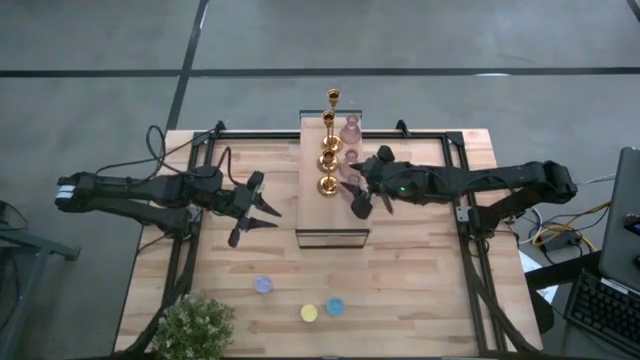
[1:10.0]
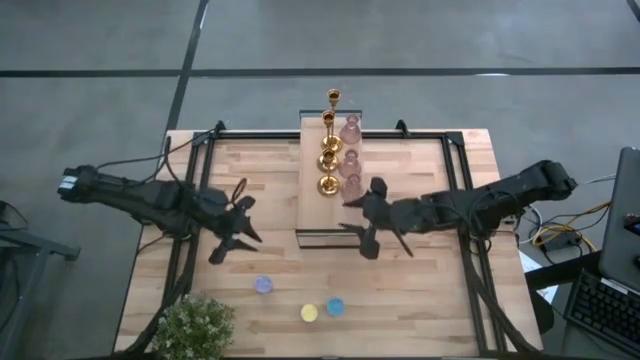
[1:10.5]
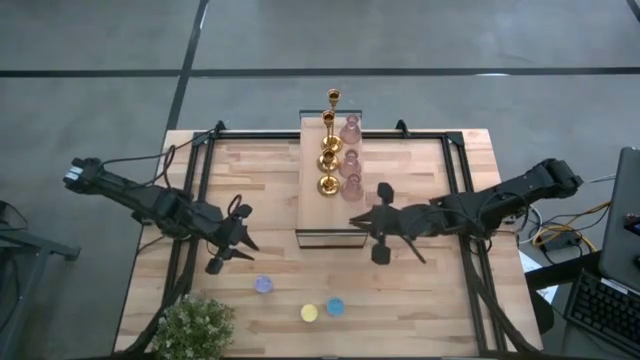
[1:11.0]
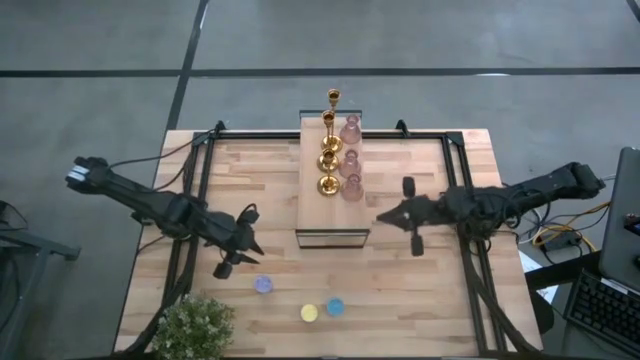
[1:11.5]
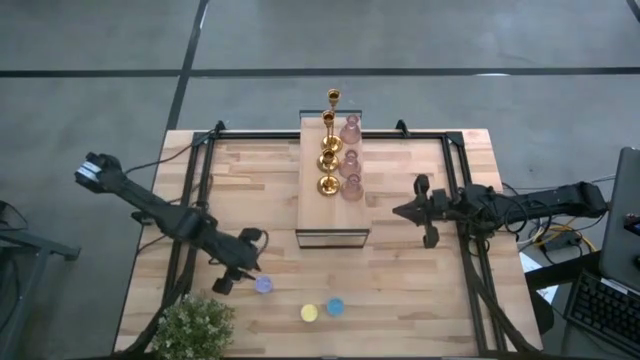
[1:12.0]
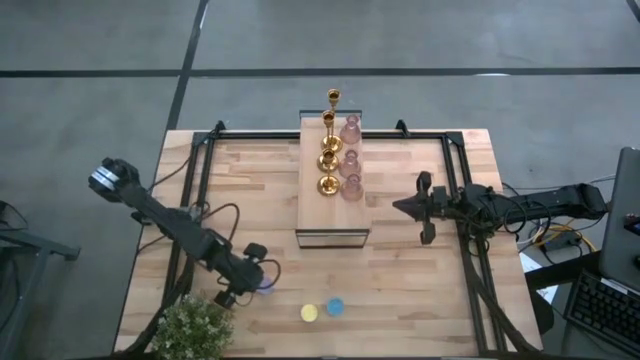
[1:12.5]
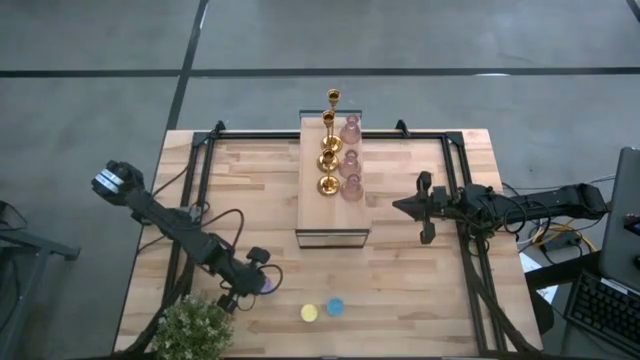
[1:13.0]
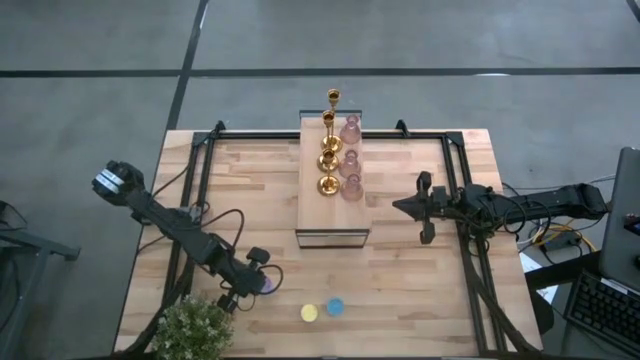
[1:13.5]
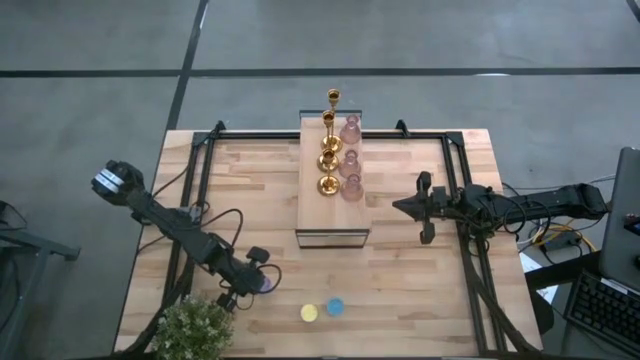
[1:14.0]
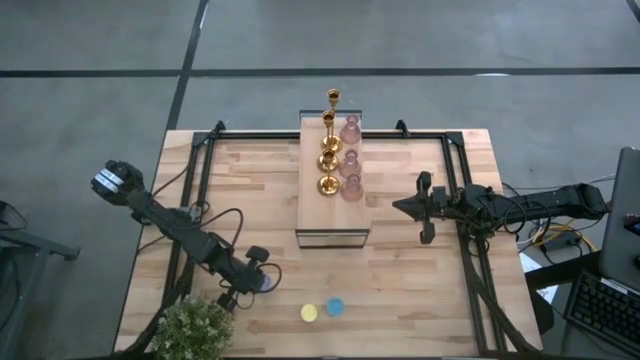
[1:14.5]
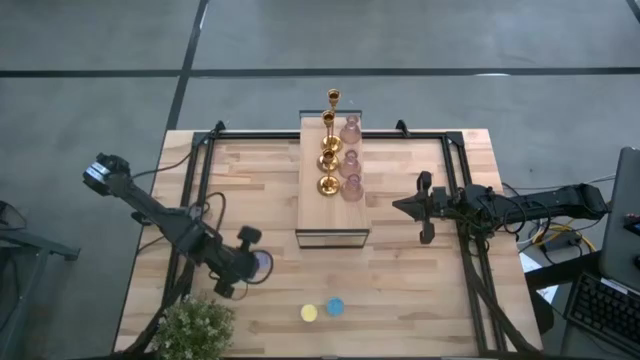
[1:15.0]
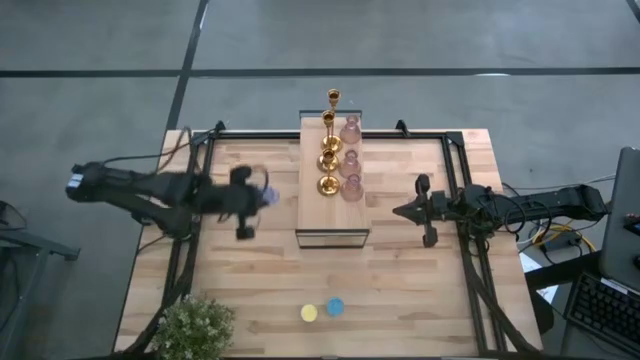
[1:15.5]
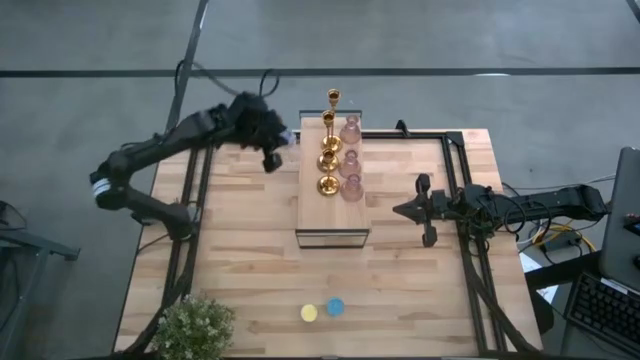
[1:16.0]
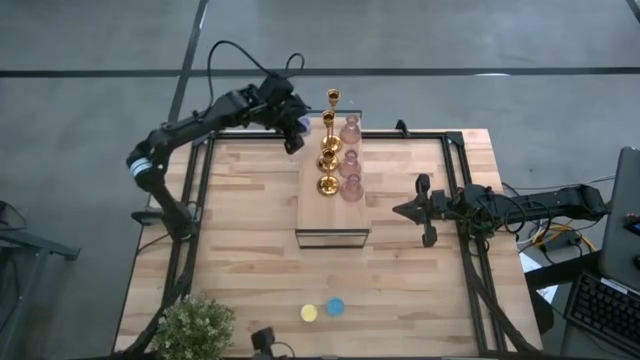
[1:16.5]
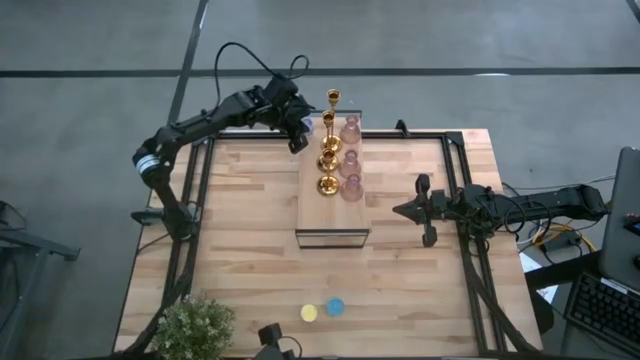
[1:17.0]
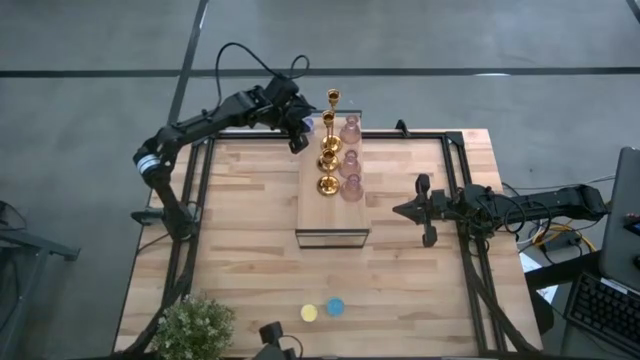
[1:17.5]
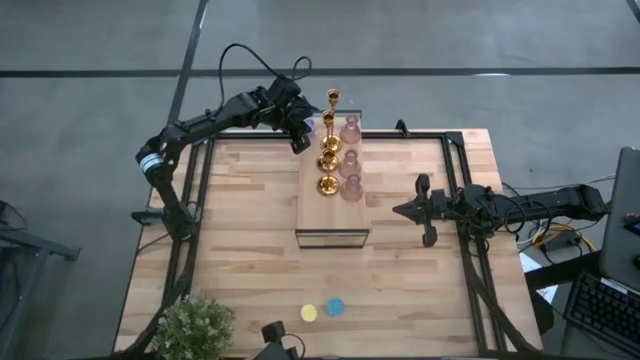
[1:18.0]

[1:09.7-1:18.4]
Task: Pick & Place candle stick holders
Put the purple scented candle on the shelf

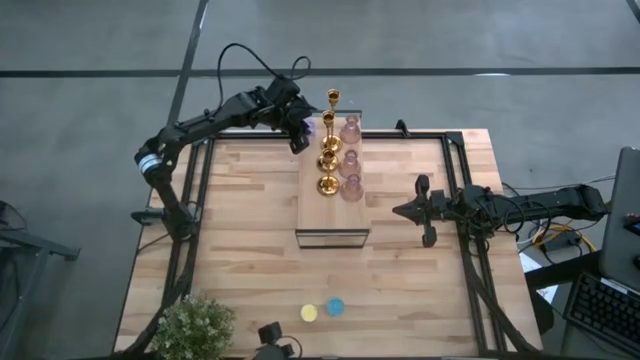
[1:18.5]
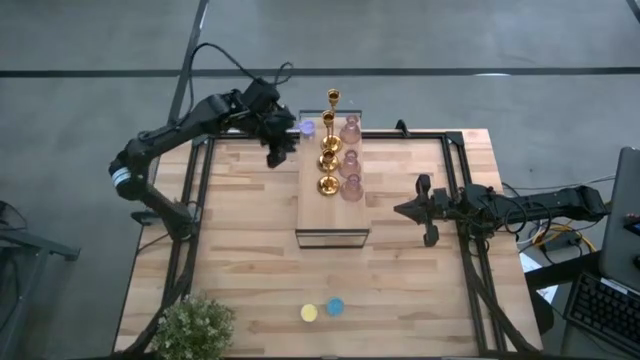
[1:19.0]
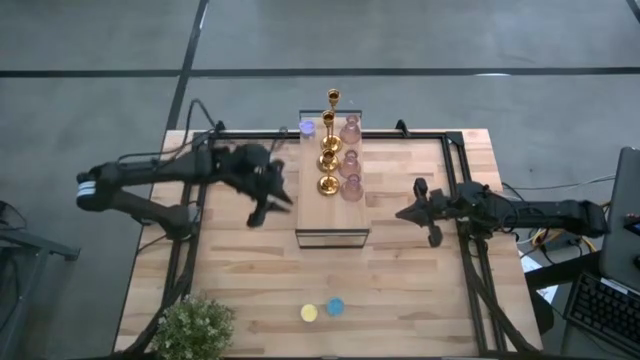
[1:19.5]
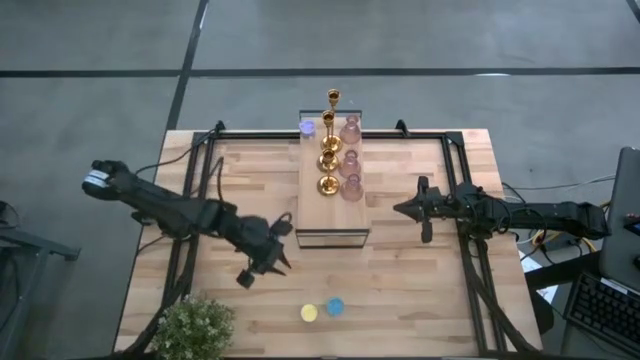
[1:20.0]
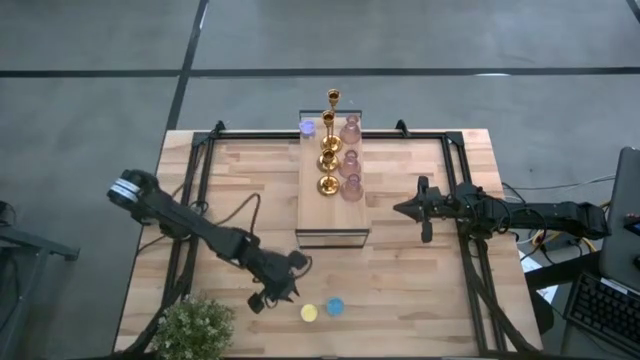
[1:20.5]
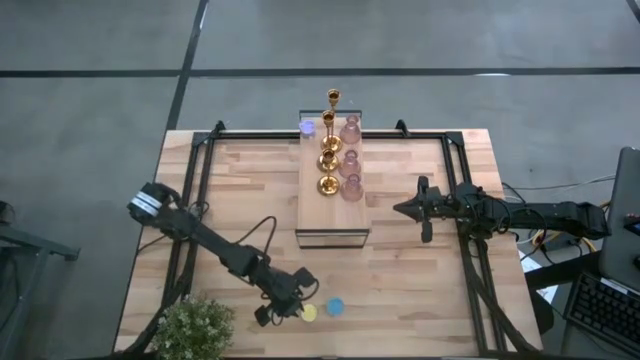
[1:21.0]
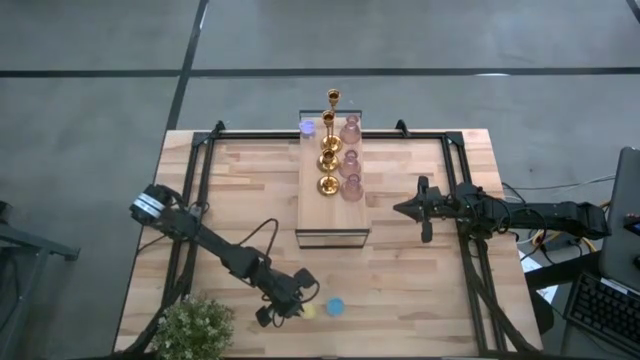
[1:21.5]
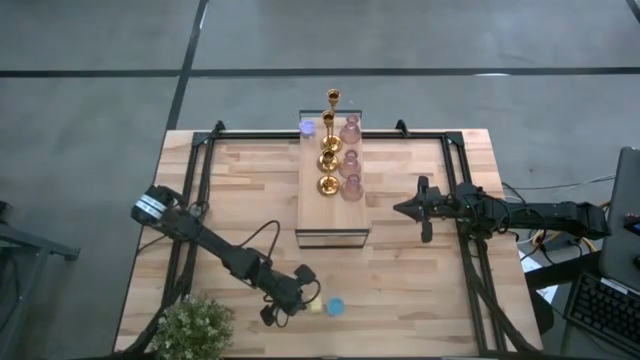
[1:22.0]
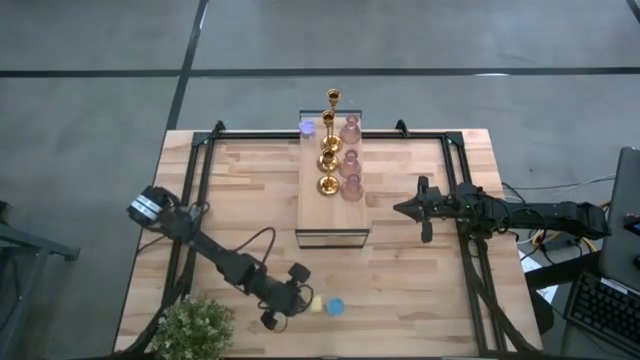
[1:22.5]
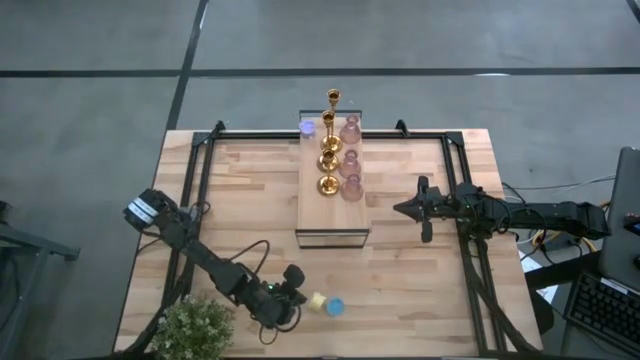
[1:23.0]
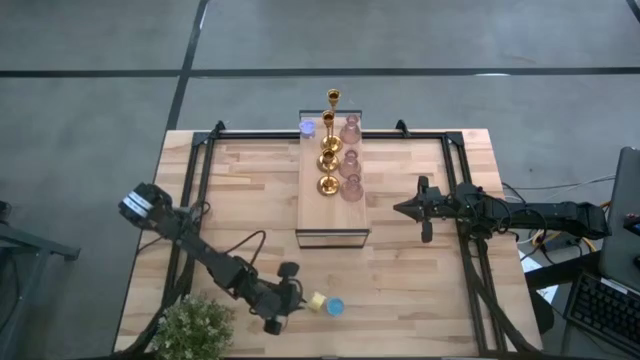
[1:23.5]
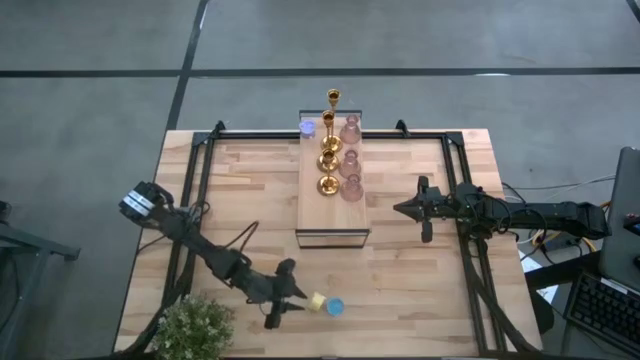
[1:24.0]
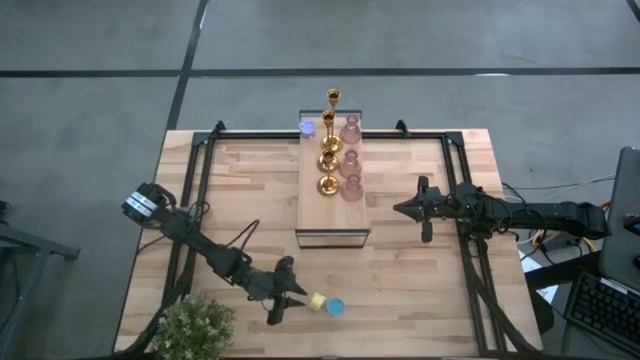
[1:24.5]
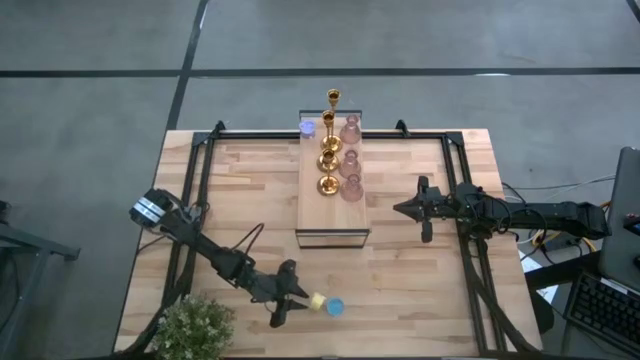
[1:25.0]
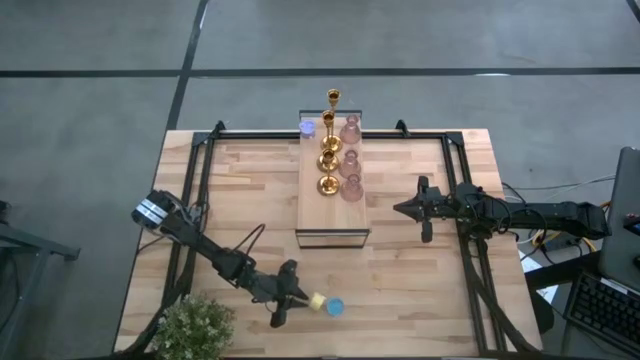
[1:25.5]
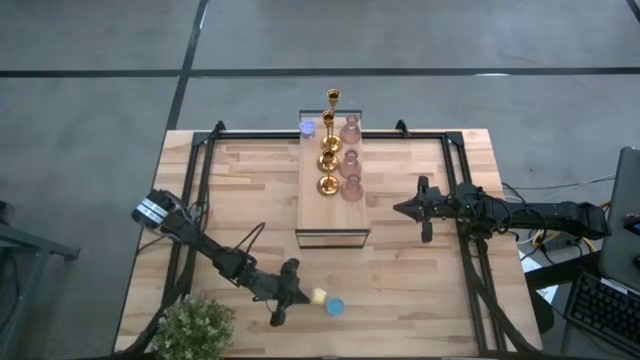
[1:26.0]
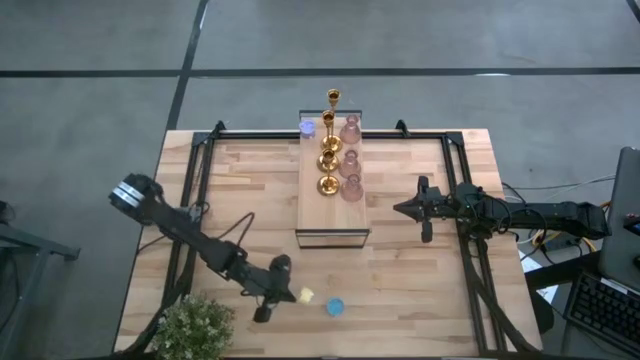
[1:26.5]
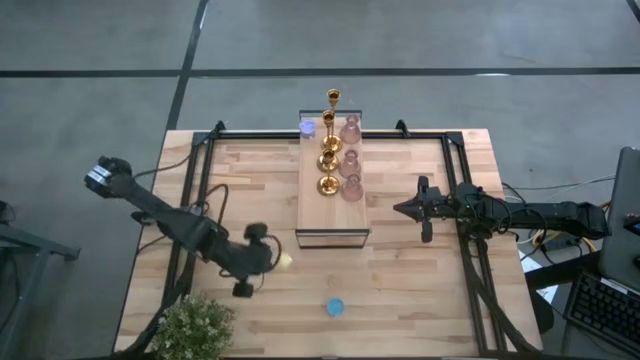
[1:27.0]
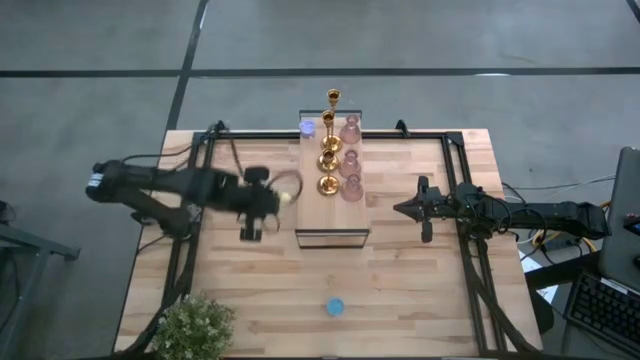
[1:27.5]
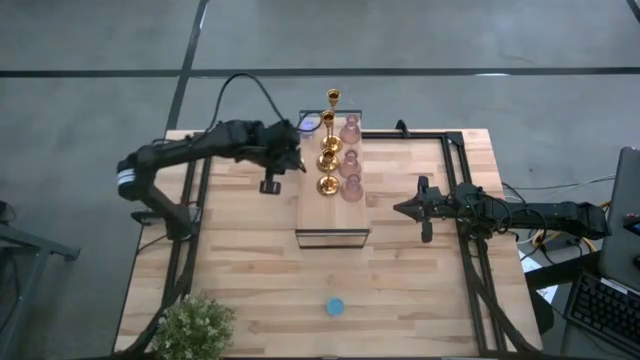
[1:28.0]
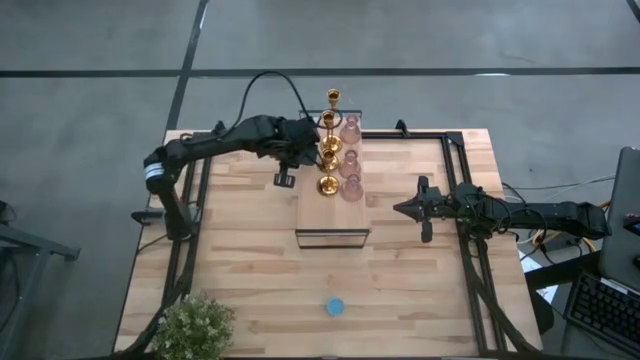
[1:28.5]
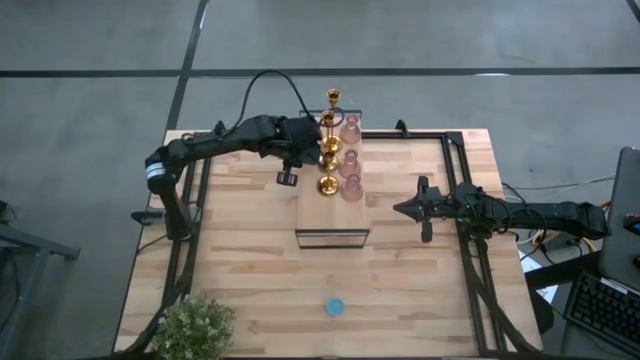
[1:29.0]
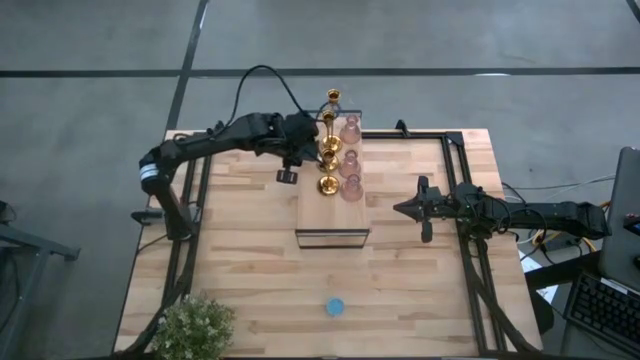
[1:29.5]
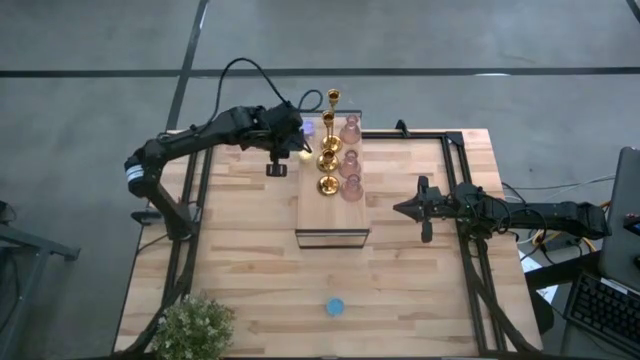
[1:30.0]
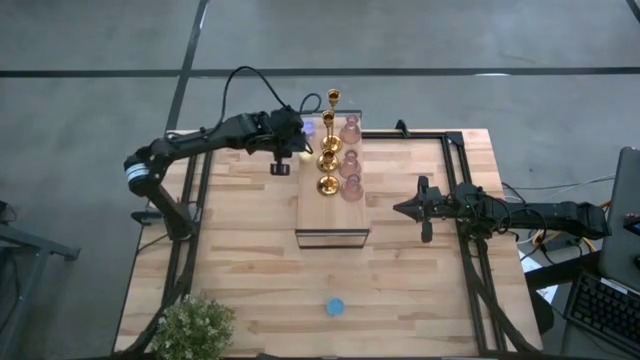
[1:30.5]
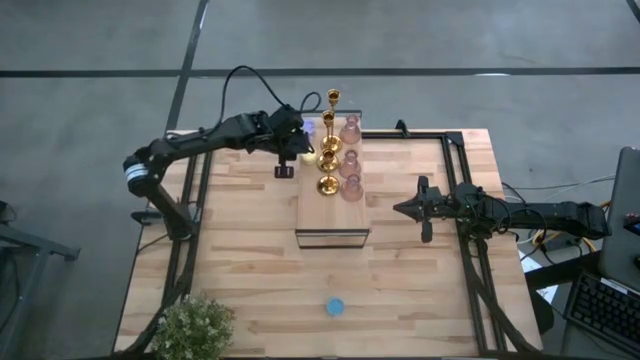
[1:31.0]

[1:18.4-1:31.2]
Put the yellow scented candle on the shelf
